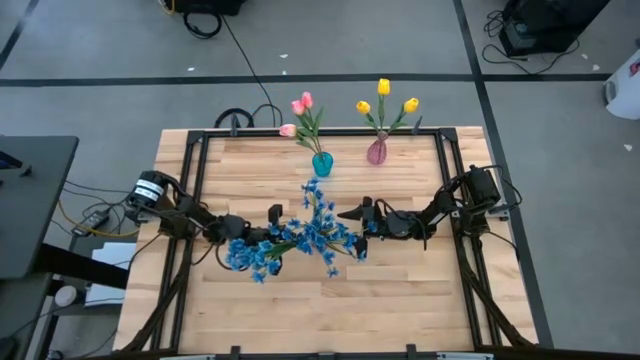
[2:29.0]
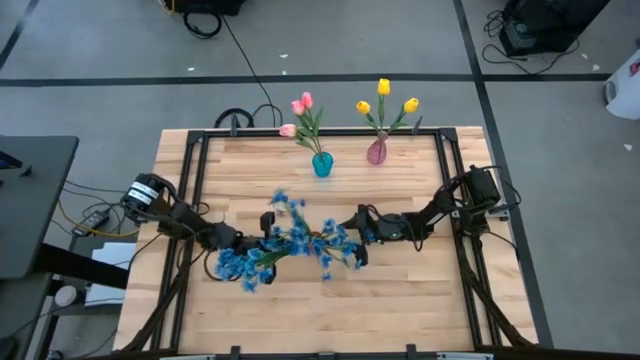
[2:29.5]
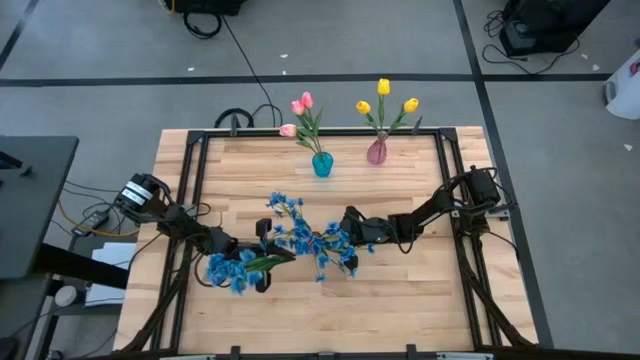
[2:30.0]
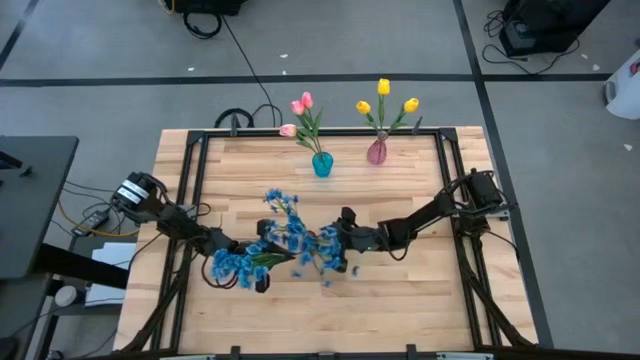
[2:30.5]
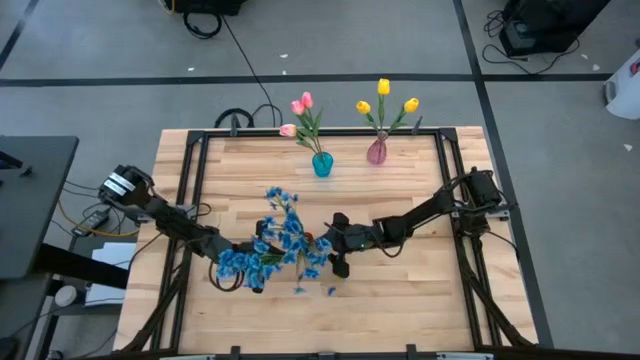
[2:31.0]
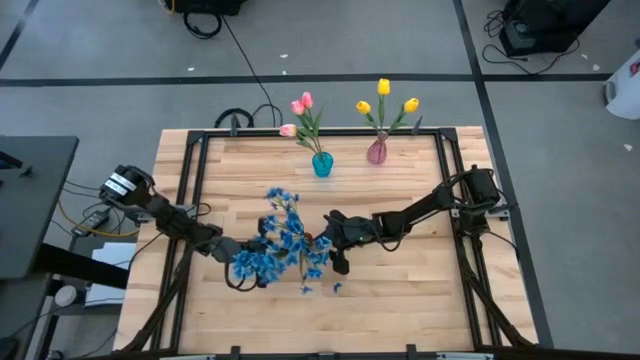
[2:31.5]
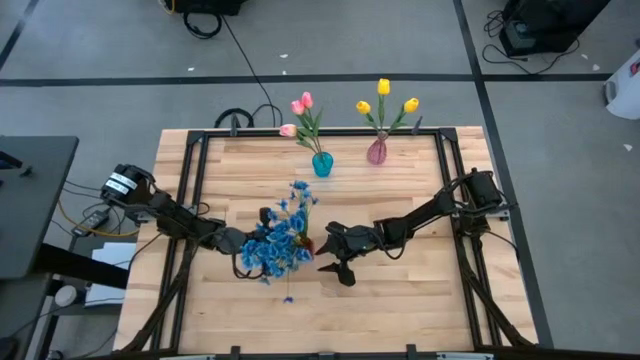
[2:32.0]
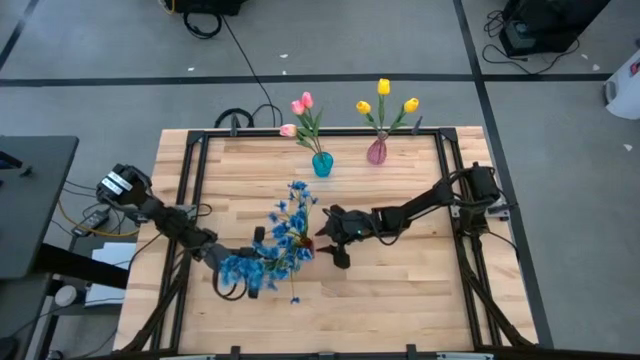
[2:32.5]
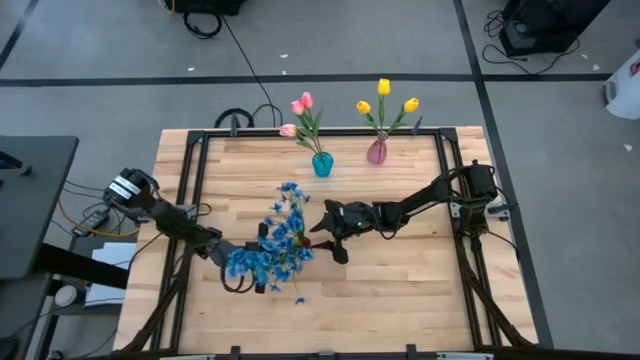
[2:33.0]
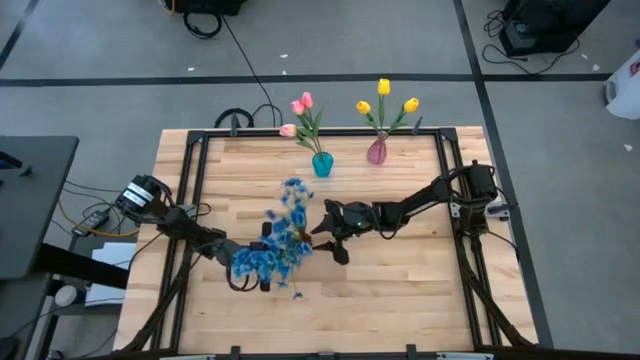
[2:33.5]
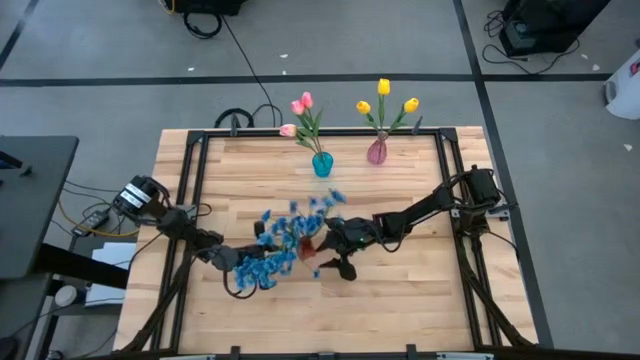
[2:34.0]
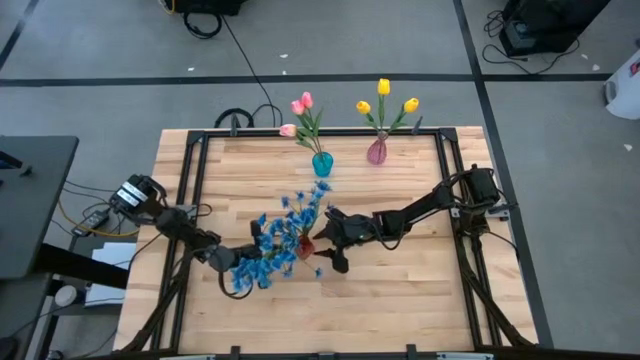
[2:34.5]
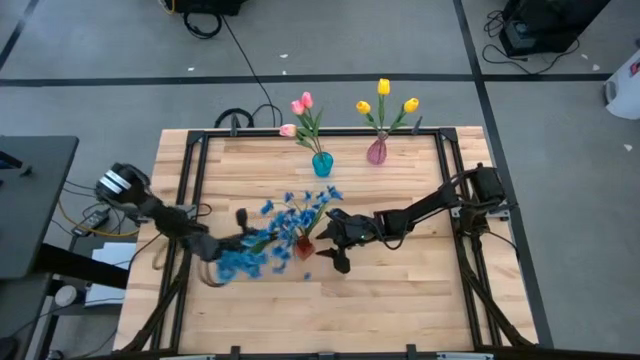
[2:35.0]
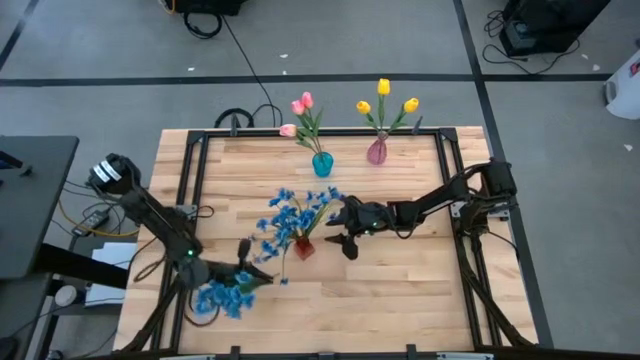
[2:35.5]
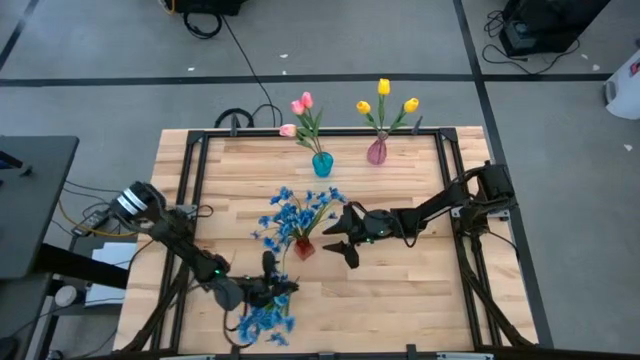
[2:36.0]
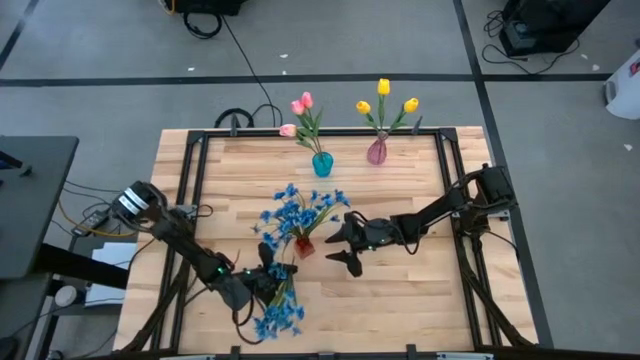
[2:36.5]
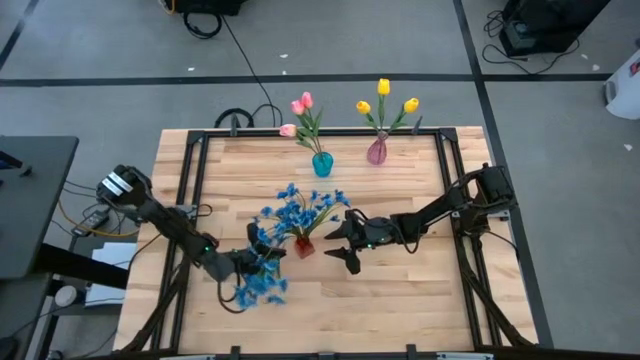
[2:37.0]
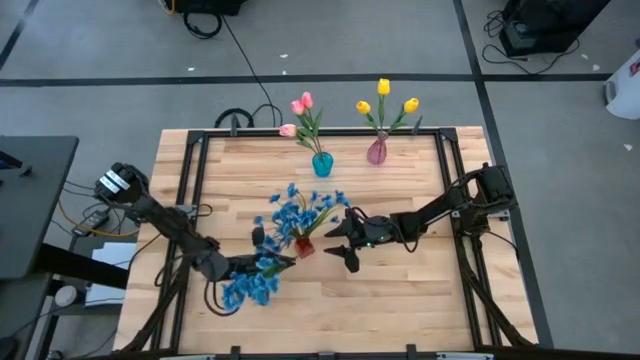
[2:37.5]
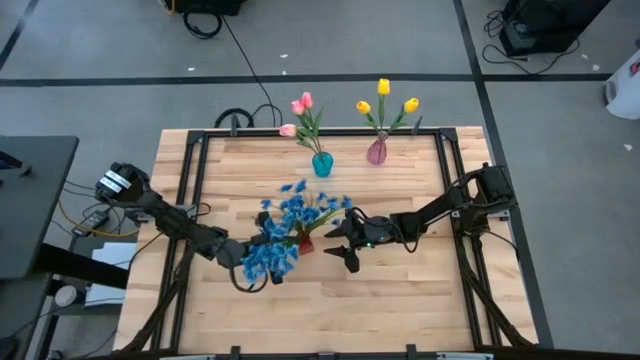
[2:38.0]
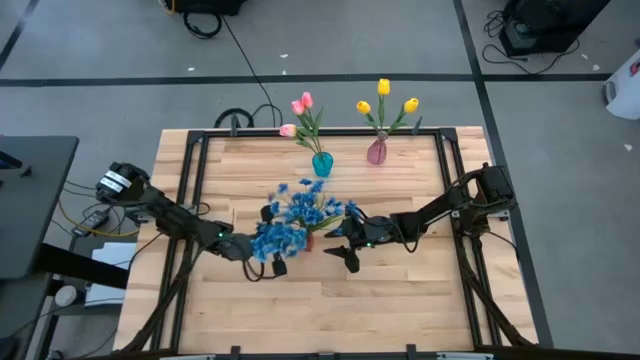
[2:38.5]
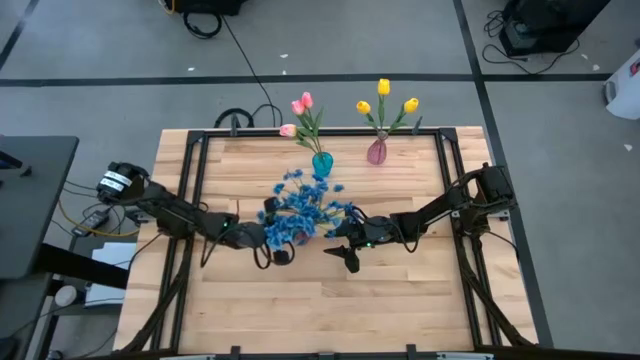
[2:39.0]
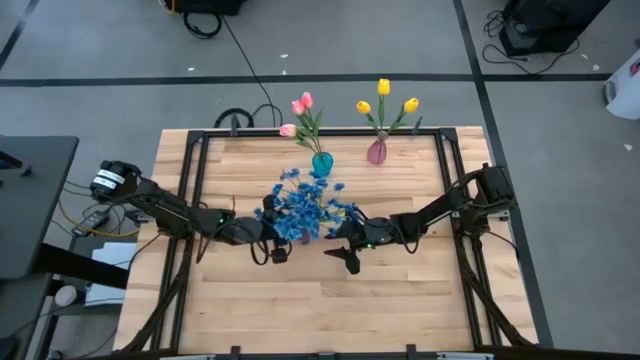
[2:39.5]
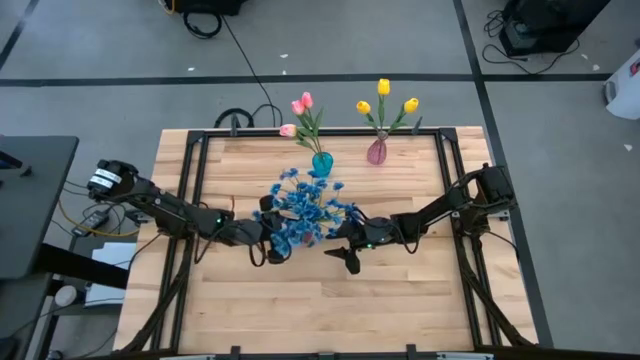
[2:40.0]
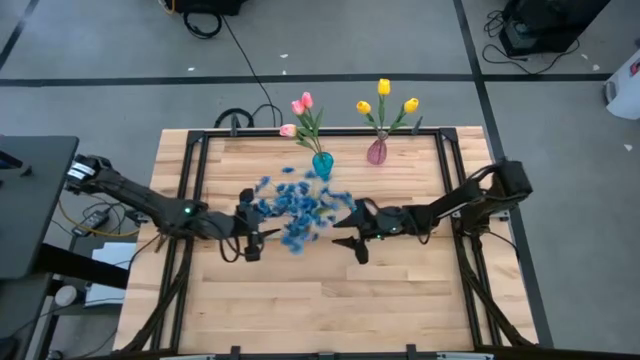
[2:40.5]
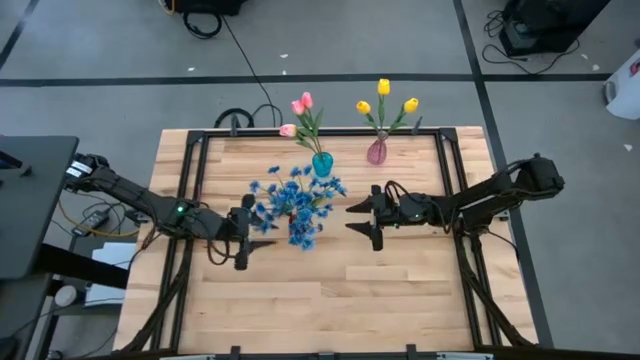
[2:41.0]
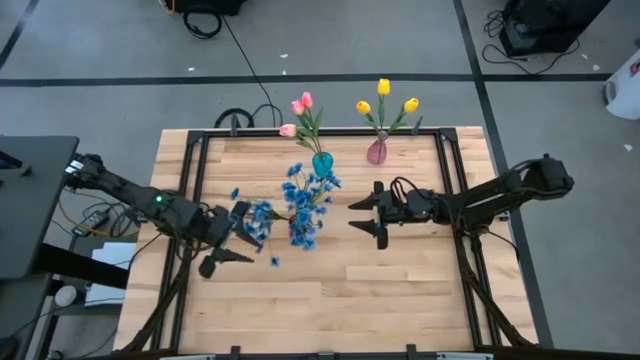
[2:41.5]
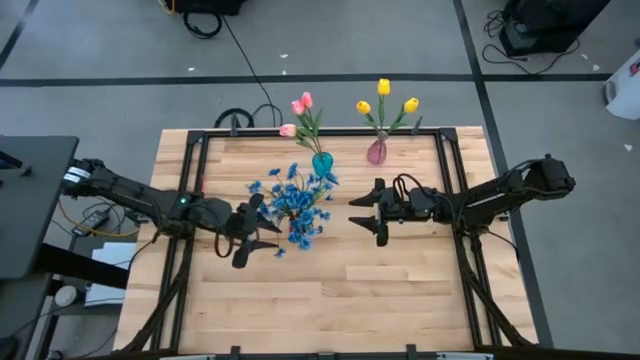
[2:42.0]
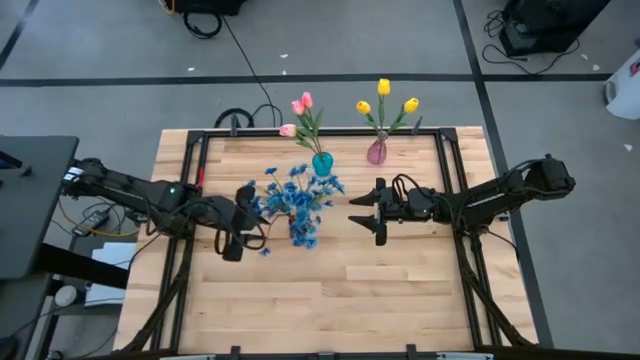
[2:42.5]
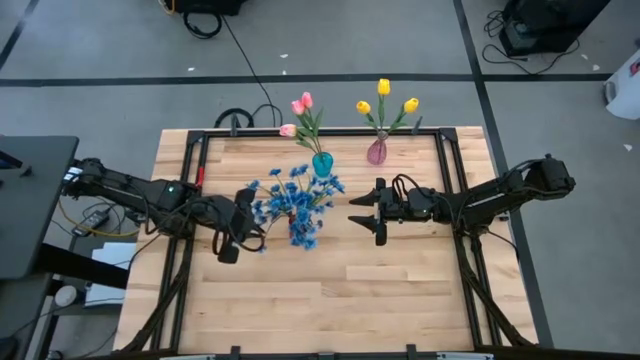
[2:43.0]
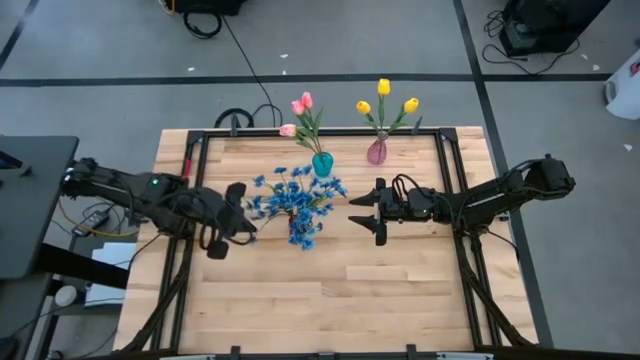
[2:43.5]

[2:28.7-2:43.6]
Task: Sort flowers into vase by color
Put the blue flower into the red vase

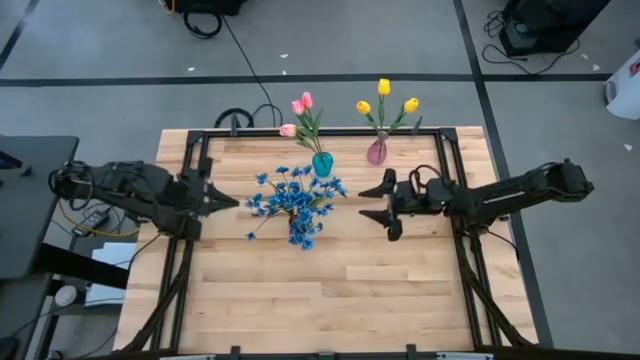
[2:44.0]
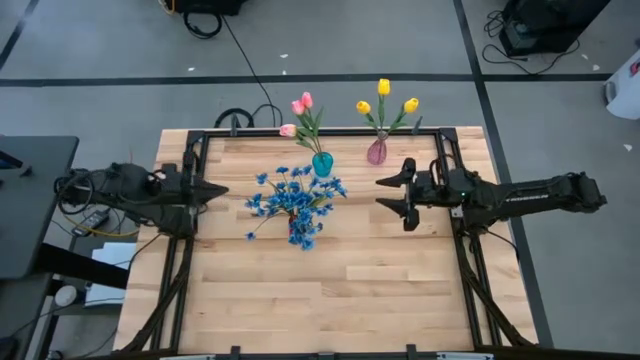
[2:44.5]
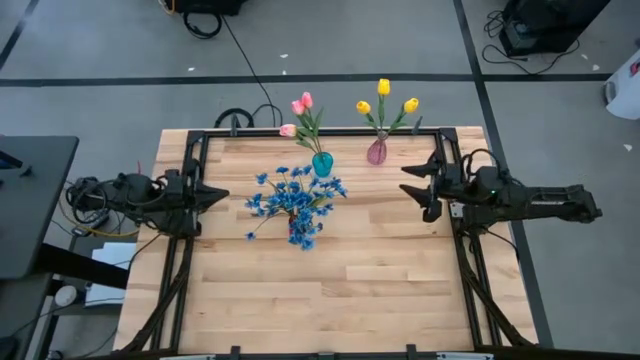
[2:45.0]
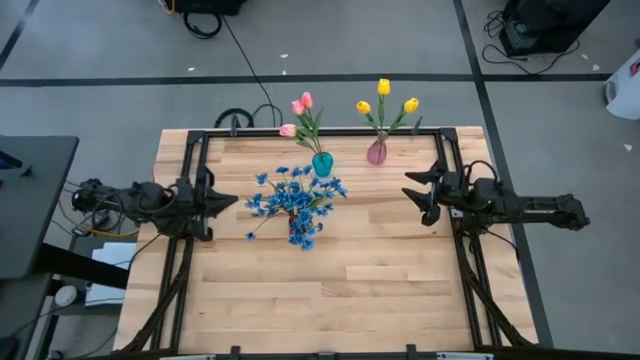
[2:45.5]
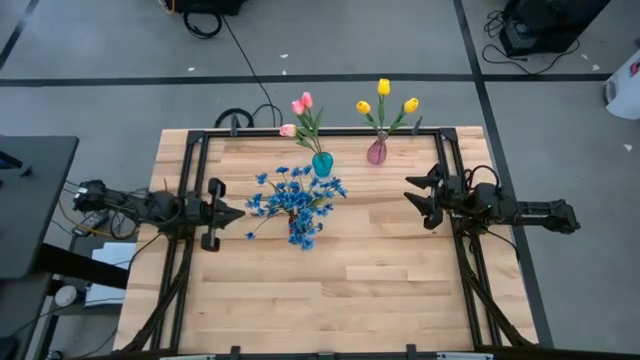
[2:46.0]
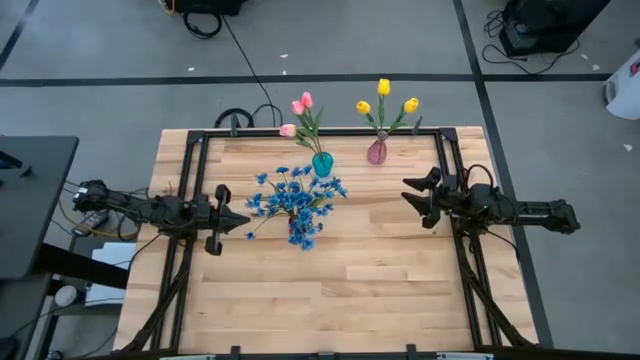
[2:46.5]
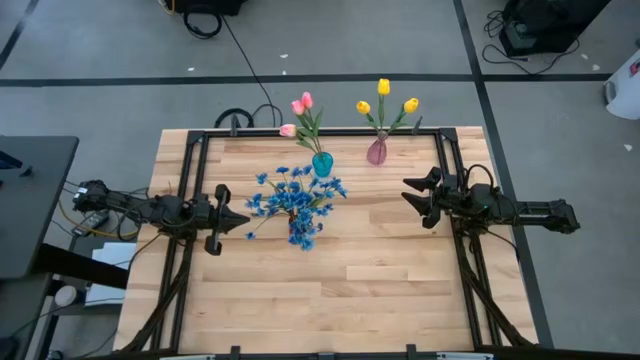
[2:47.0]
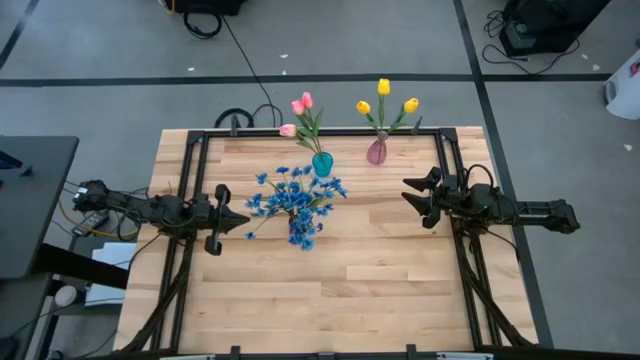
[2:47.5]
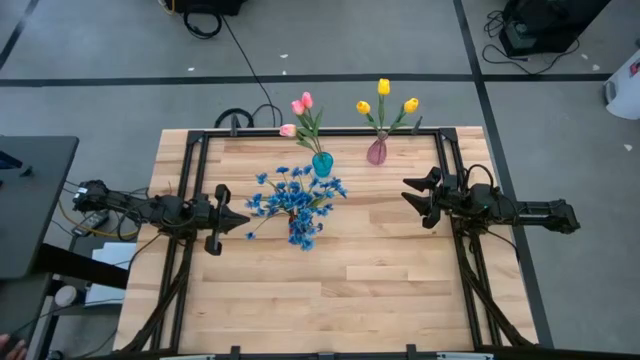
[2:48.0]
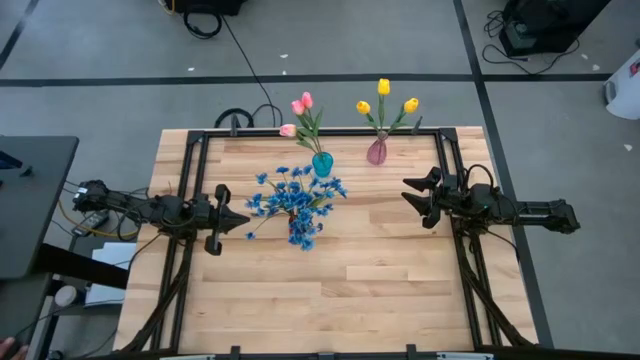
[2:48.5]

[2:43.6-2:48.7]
Return to Home Position
